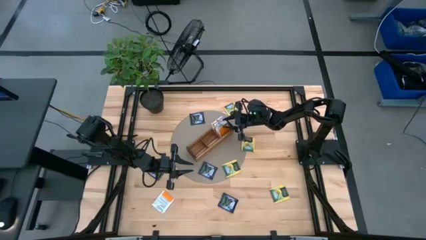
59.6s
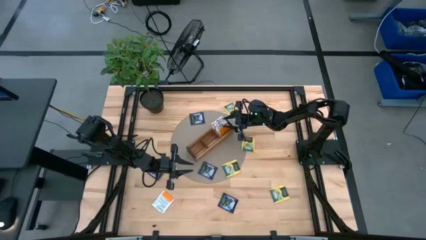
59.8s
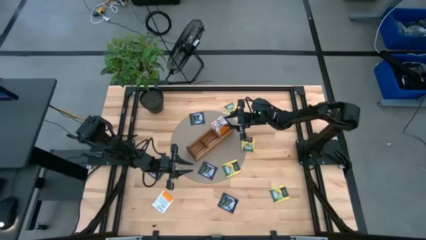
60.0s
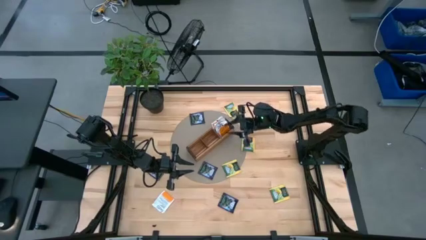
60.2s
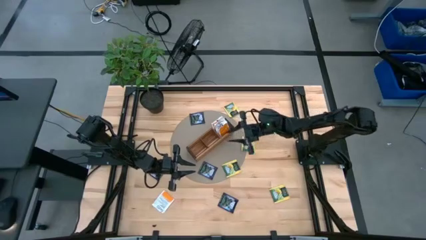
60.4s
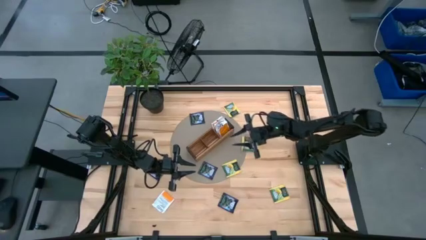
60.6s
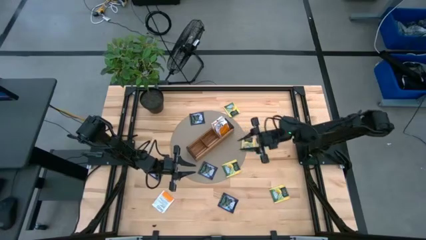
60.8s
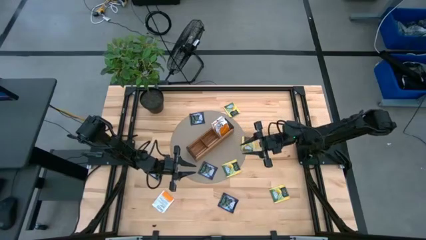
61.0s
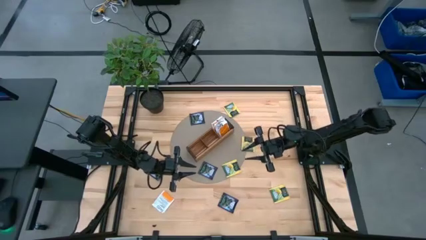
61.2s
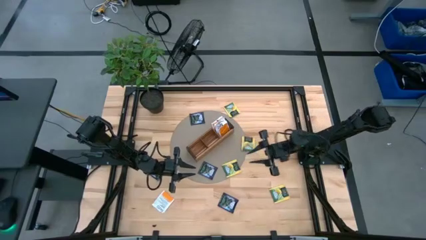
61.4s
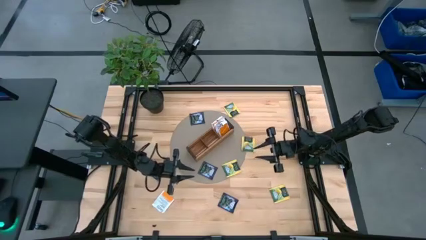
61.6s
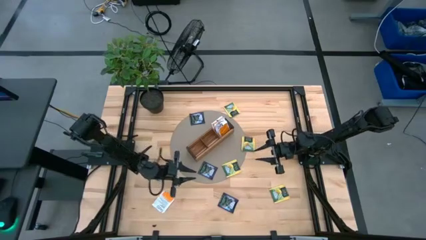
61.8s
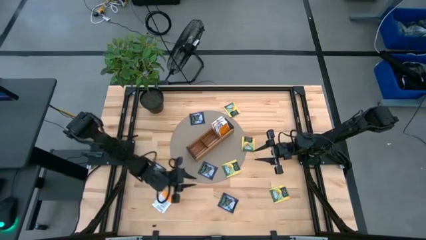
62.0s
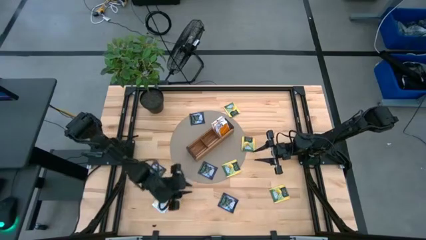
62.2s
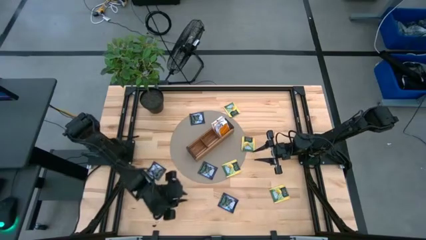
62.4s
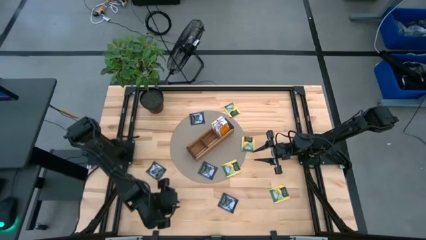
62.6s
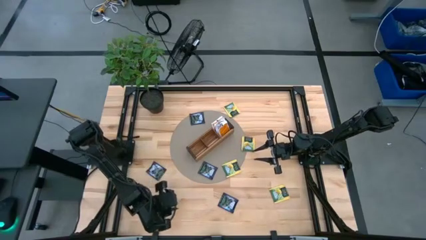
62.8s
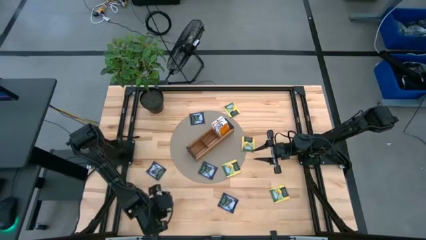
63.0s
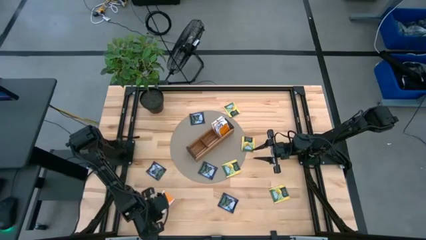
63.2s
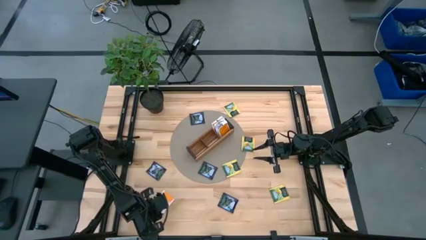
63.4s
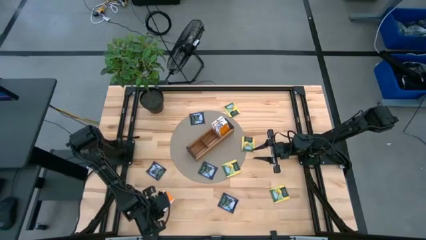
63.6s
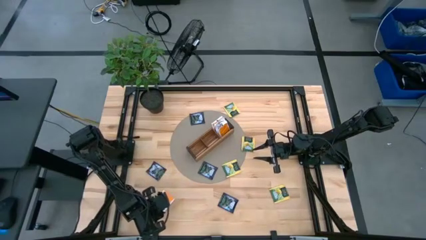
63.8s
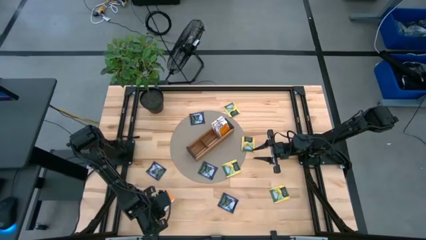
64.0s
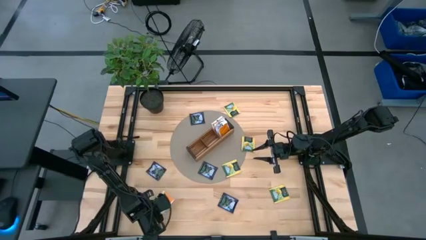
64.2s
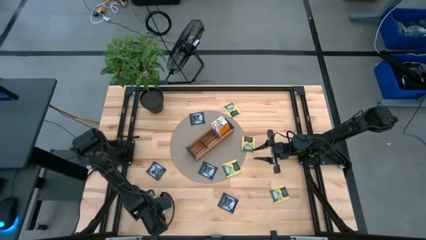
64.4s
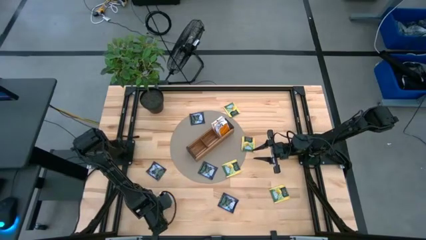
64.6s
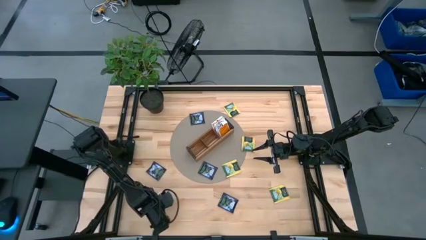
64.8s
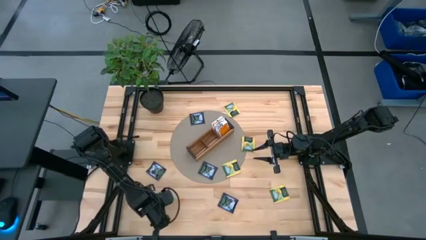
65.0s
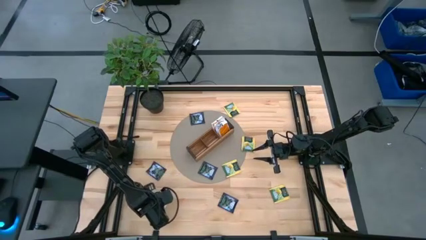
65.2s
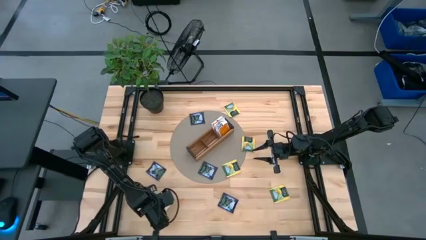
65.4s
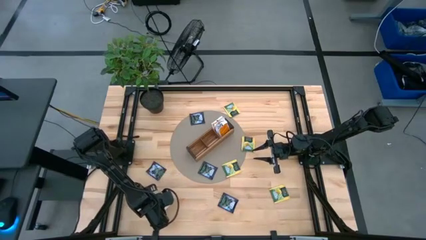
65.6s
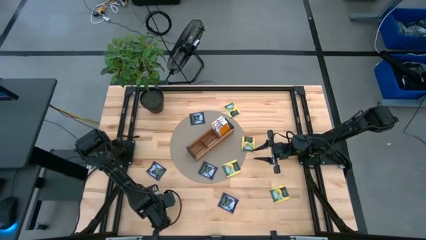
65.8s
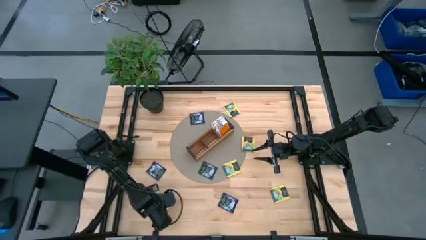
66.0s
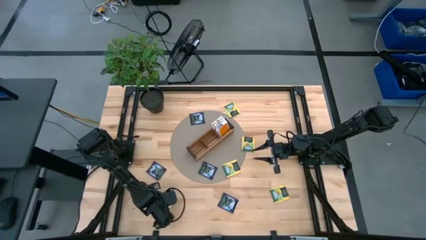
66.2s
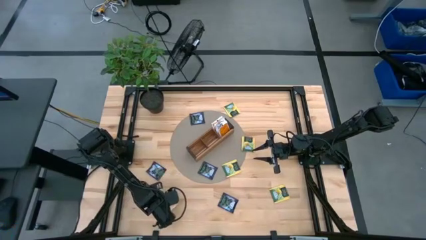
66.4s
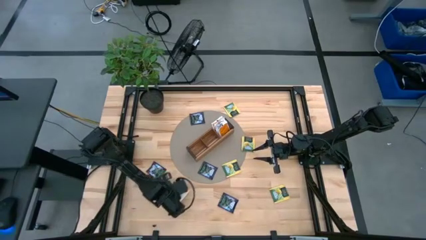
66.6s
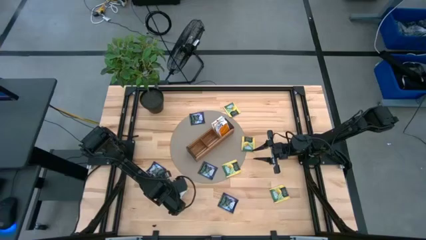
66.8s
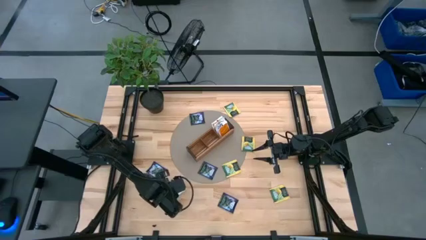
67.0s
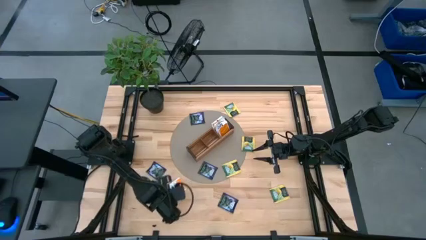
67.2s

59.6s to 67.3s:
Task: Pick & Place Tea
Put the orange tea bag into the right section of the wooden organizer

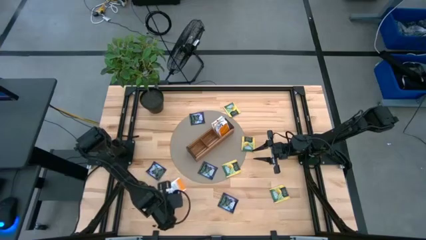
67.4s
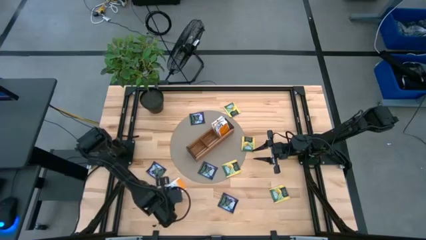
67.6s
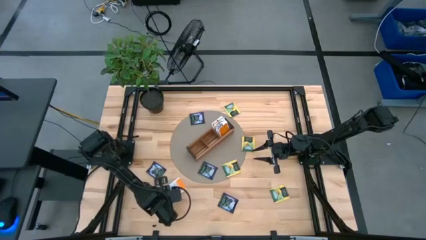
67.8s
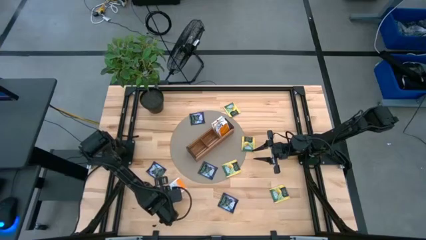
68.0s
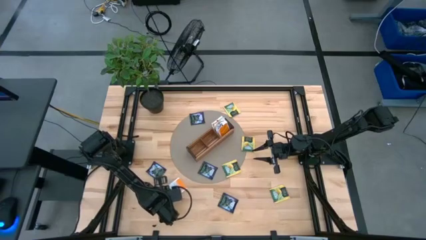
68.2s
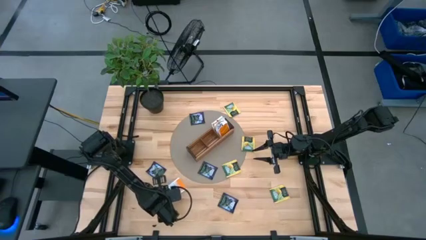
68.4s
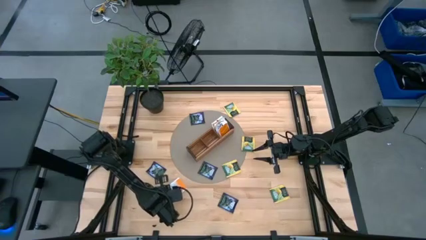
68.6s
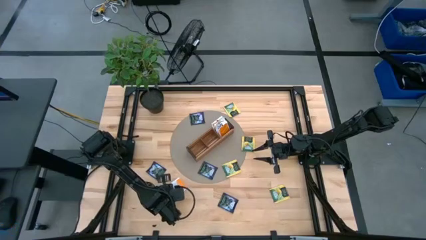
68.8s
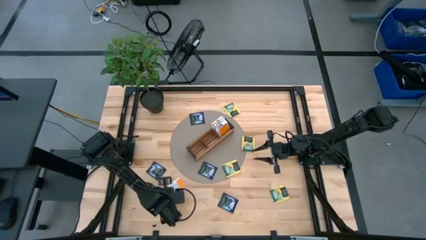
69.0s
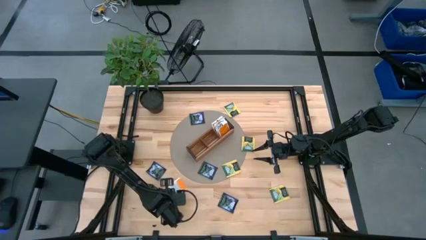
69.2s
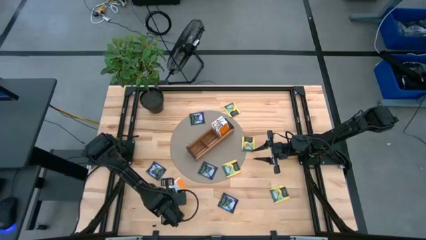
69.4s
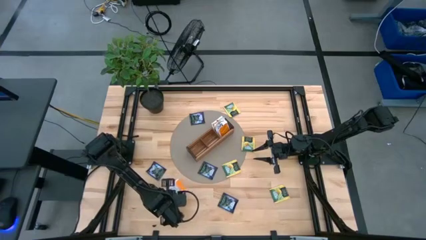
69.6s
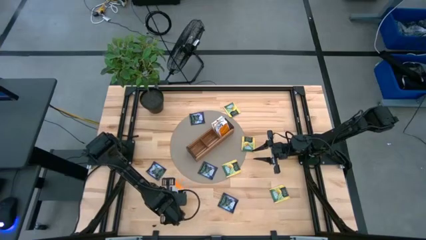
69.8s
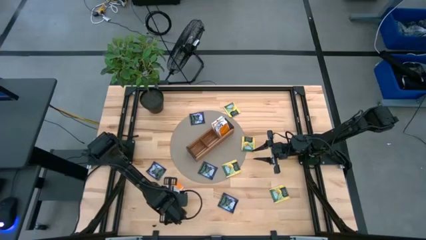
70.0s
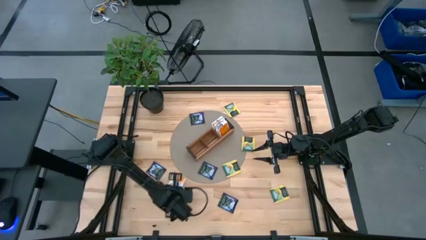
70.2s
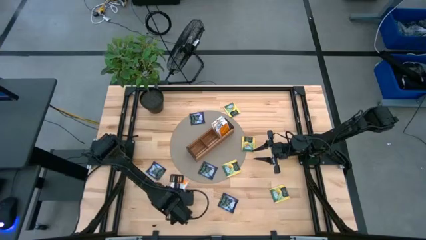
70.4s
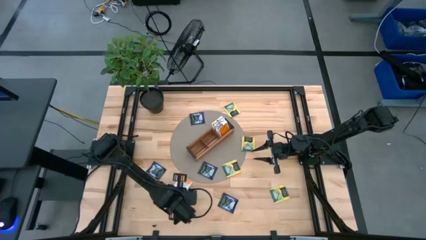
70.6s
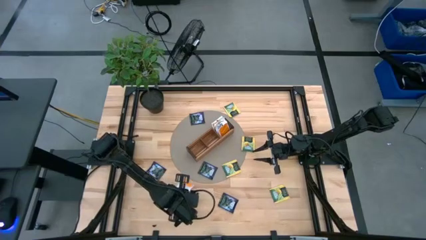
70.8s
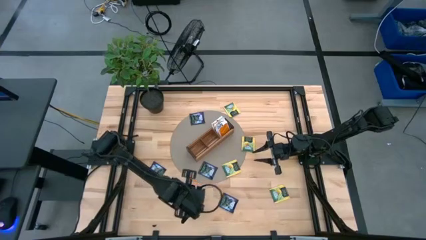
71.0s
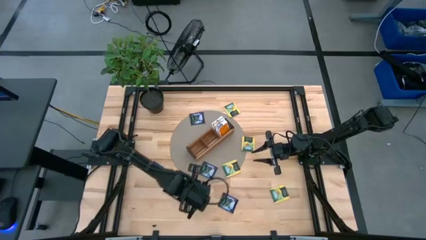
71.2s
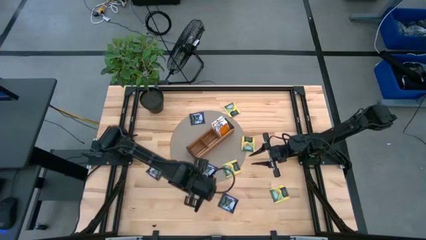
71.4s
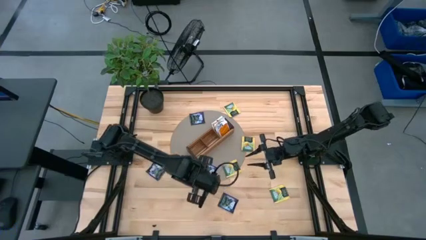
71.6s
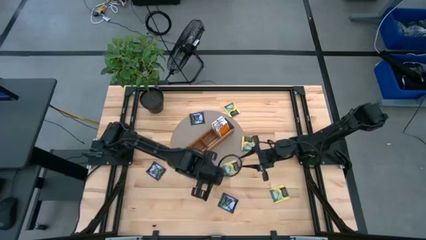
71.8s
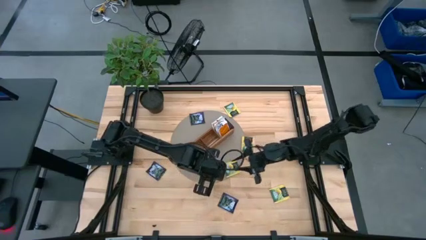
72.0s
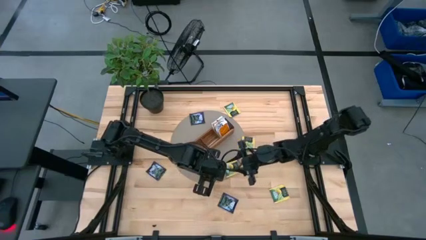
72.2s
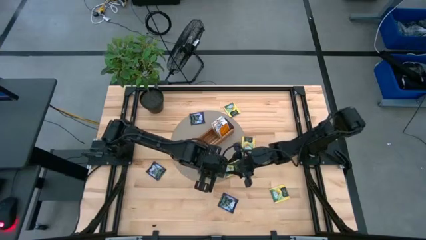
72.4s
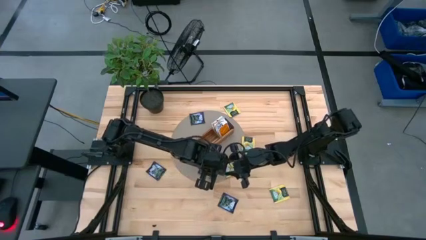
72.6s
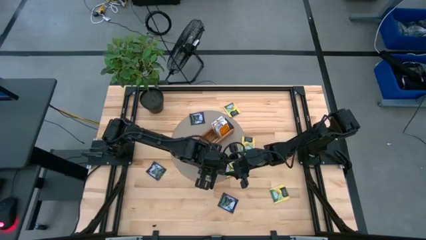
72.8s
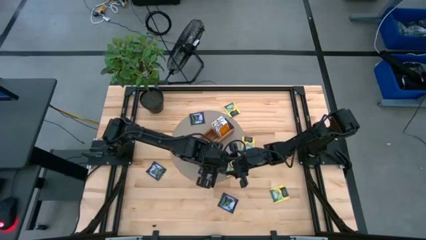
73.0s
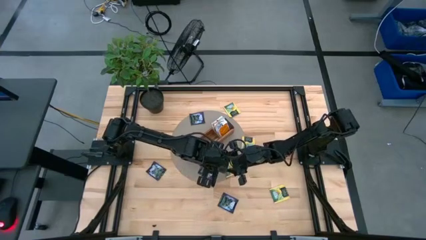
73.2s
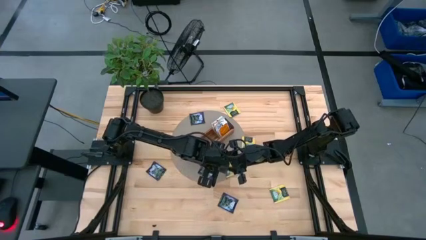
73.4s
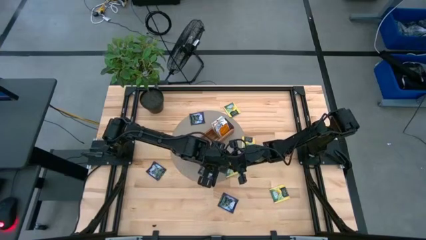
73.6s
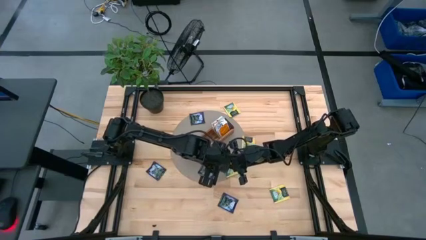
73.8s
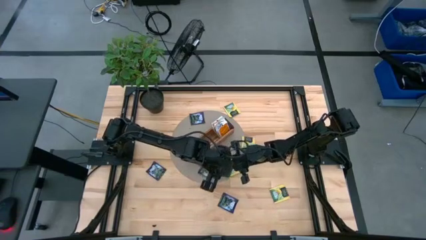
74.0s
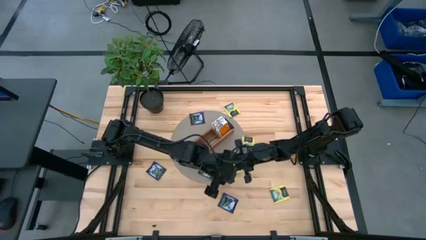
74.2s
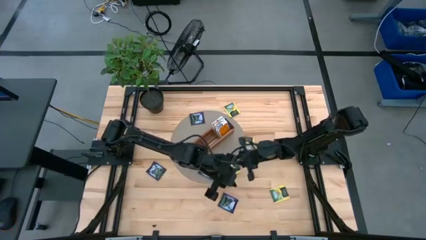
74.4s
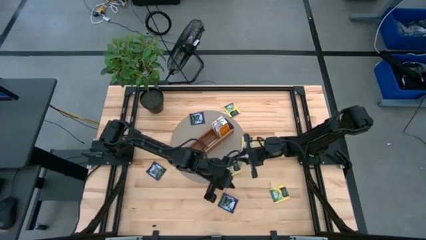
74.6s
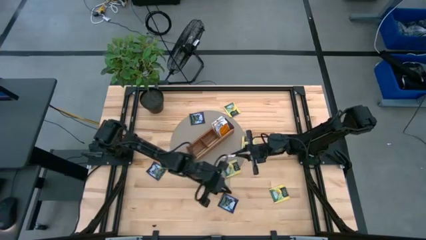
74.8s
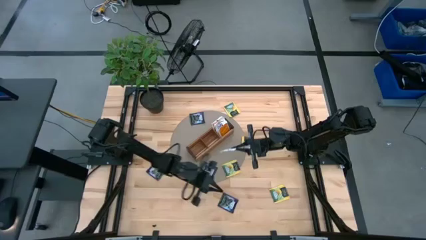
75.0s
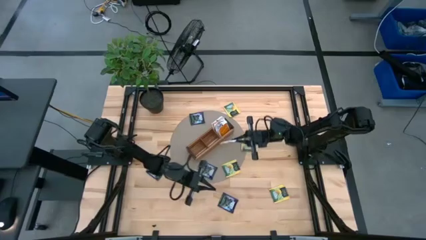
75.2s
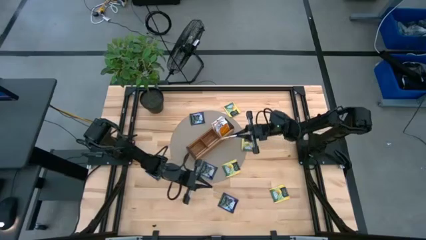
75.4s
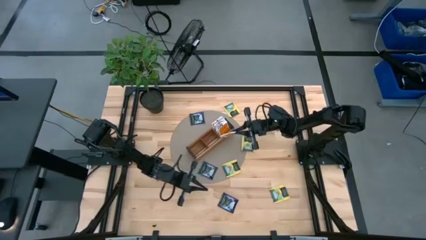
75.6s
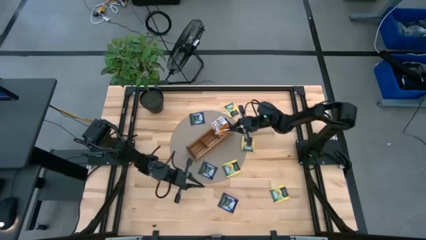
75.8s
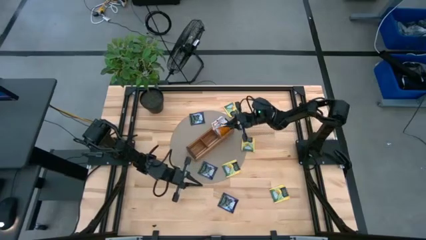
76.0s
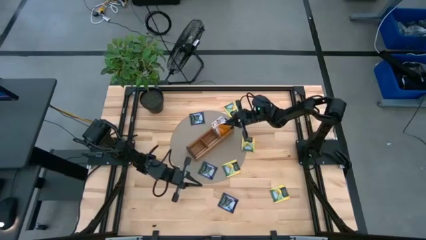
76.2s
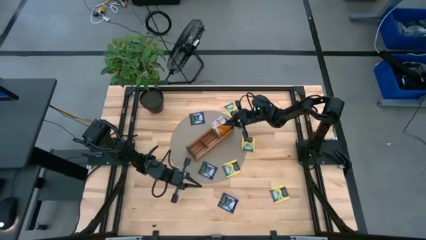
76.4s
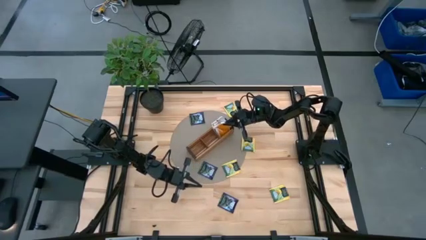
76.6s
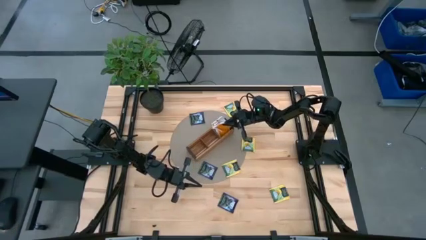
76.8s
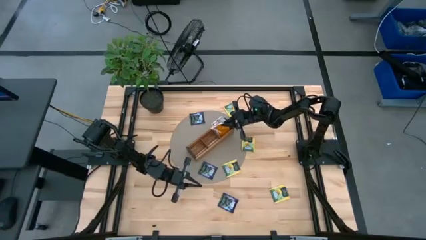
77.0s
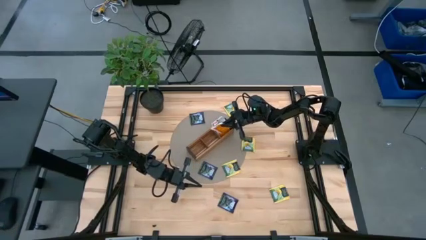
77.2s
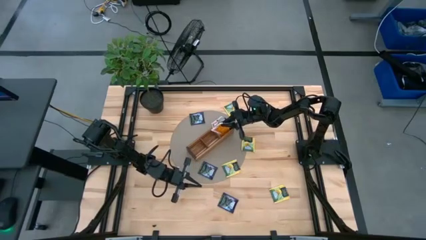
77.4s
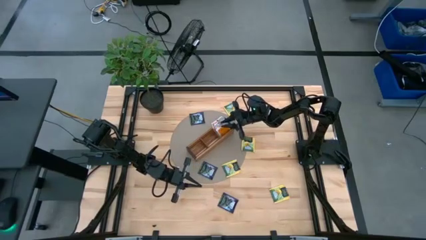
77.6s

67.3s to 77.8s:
Put the orange tea bag into the right section of the wooden organizer
